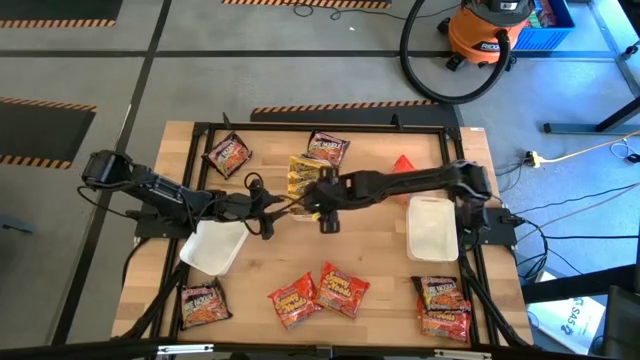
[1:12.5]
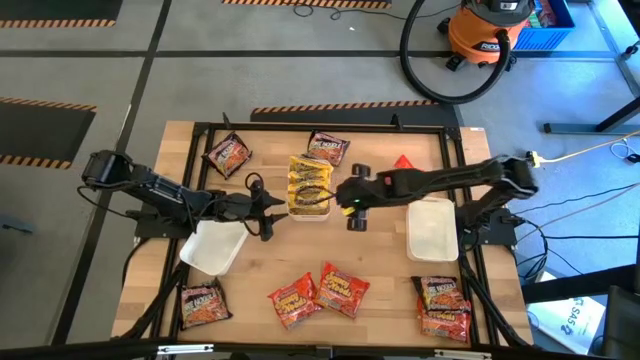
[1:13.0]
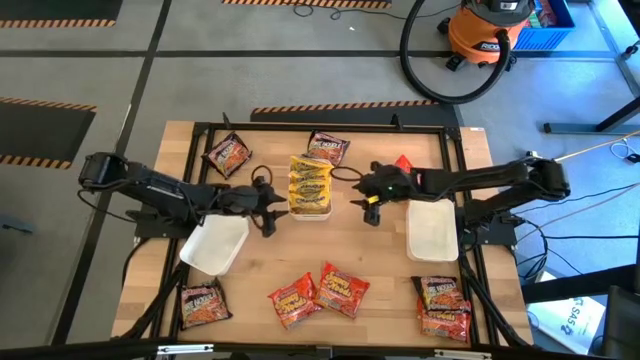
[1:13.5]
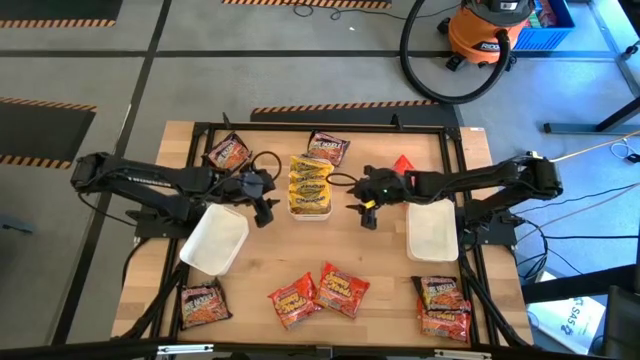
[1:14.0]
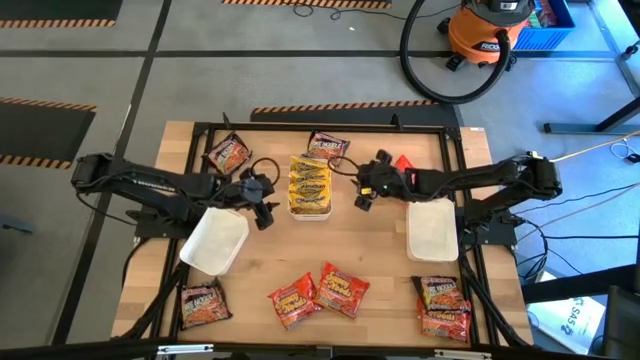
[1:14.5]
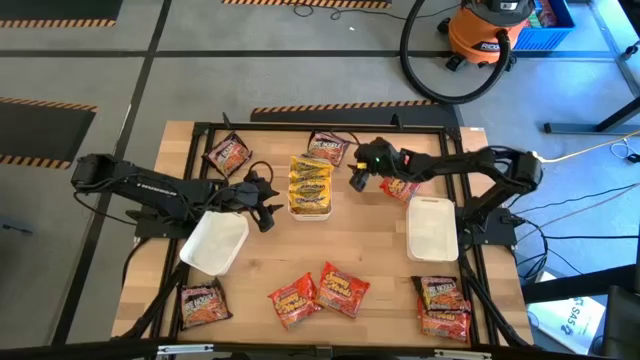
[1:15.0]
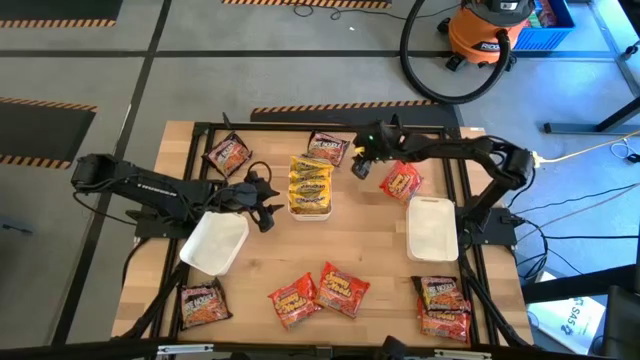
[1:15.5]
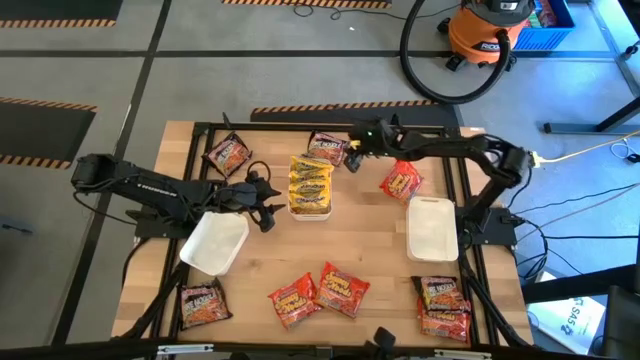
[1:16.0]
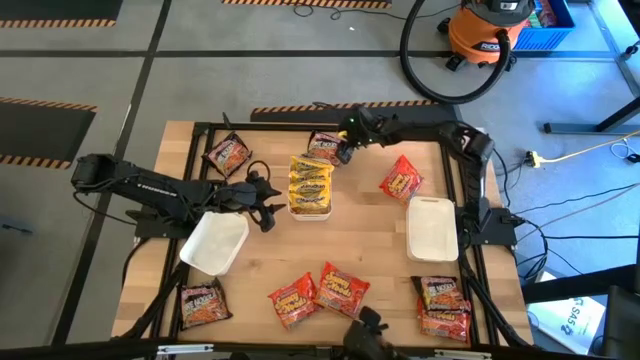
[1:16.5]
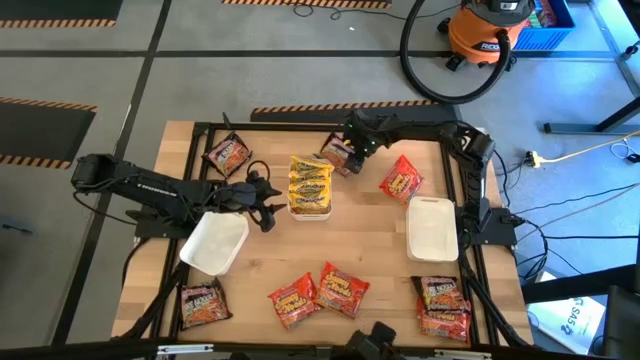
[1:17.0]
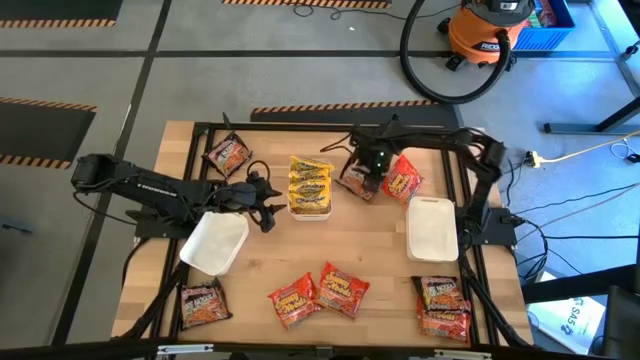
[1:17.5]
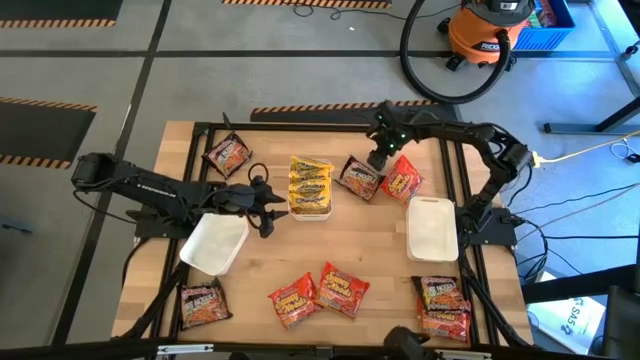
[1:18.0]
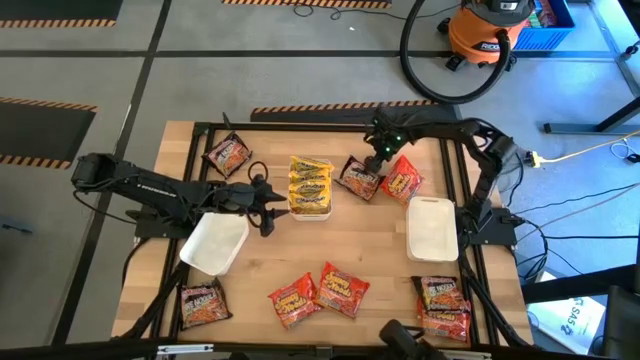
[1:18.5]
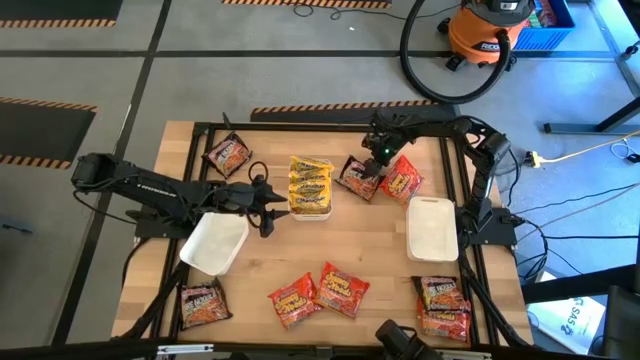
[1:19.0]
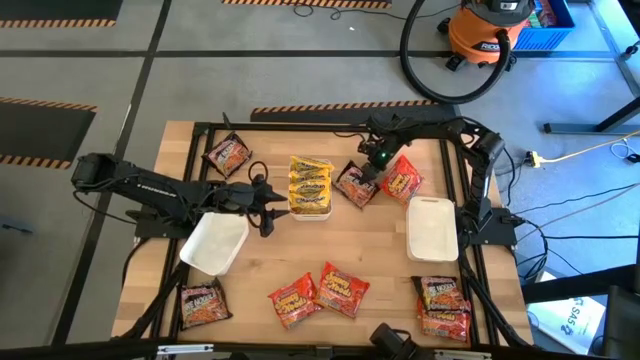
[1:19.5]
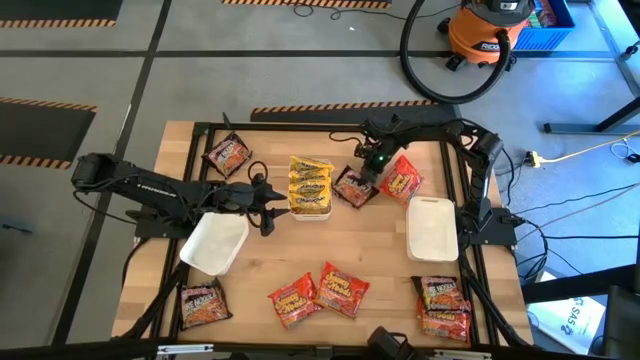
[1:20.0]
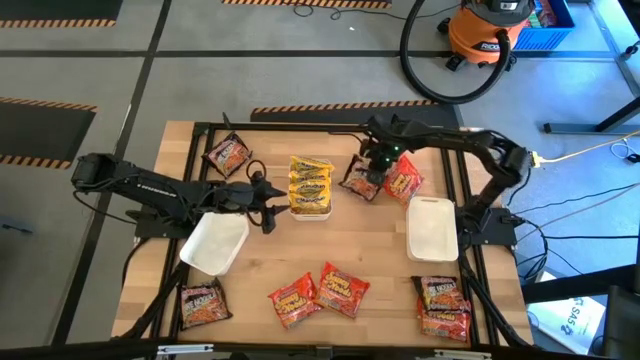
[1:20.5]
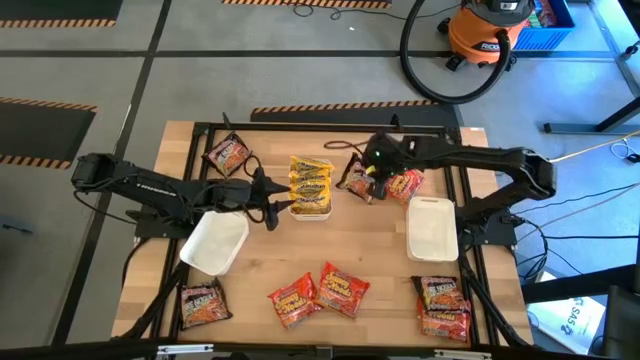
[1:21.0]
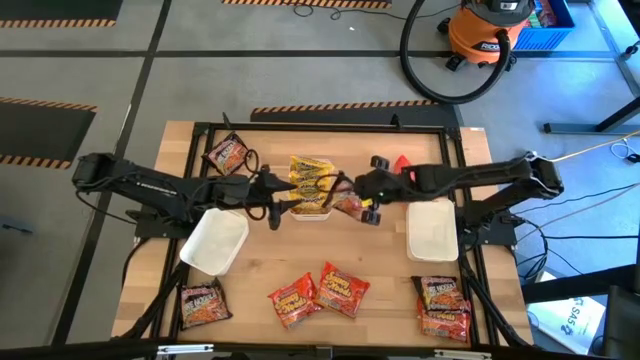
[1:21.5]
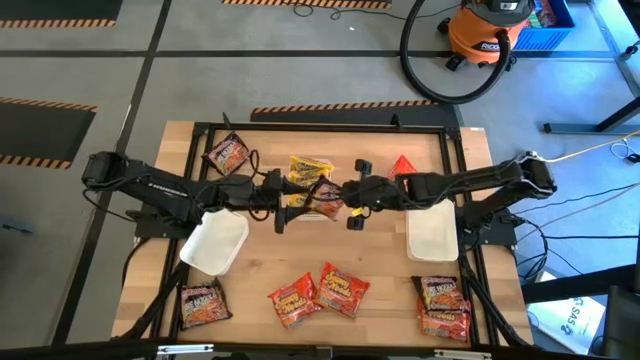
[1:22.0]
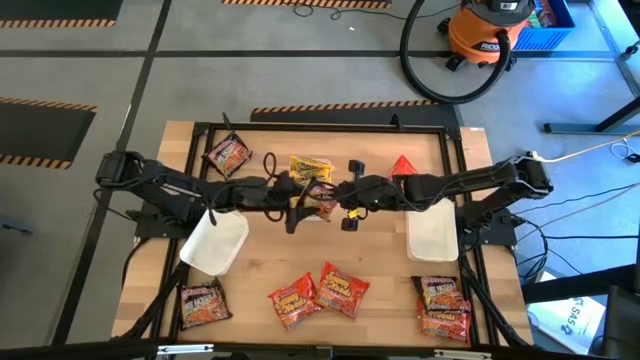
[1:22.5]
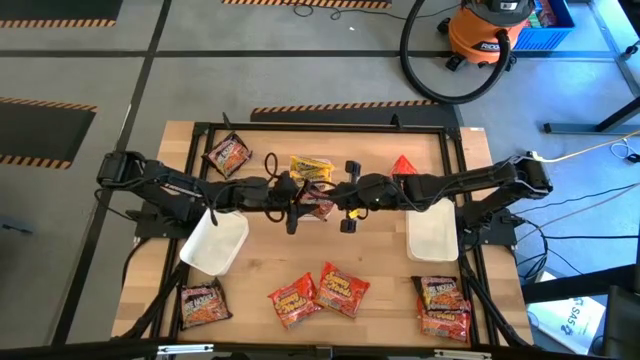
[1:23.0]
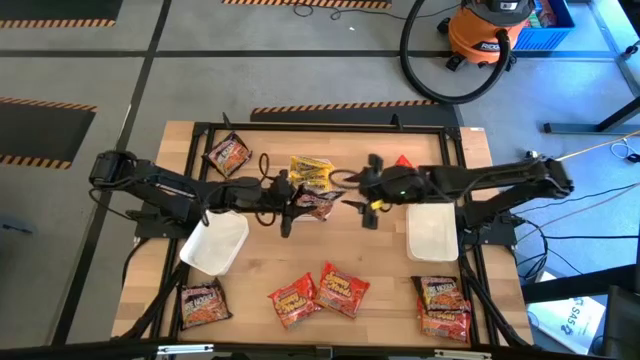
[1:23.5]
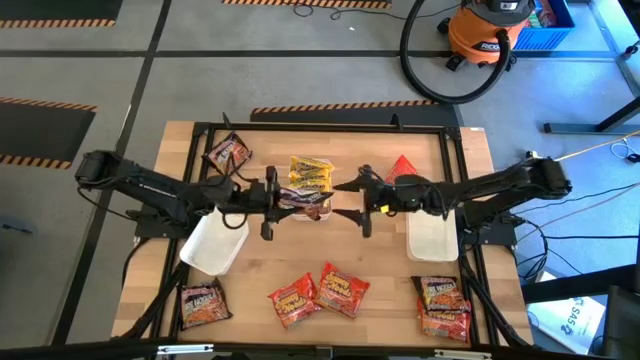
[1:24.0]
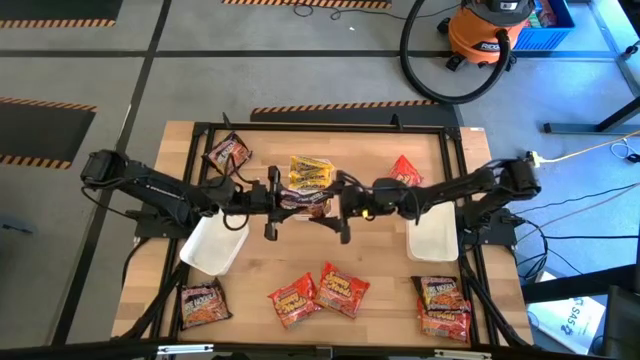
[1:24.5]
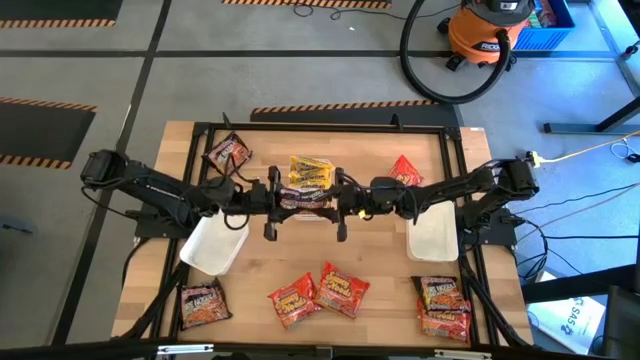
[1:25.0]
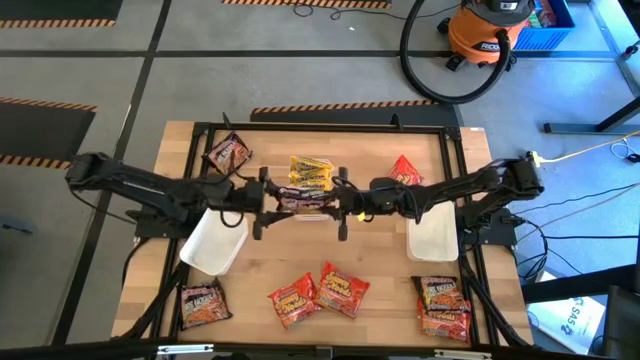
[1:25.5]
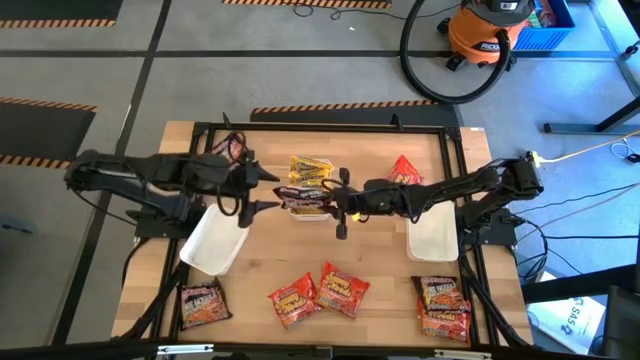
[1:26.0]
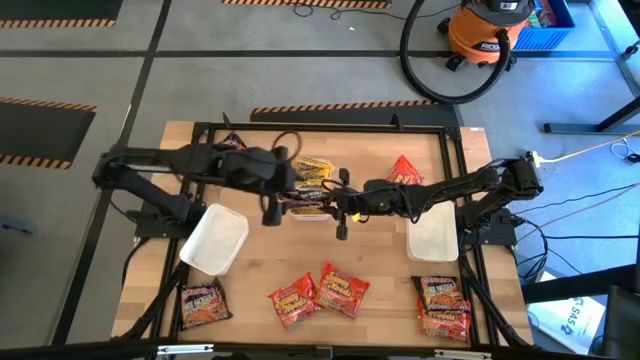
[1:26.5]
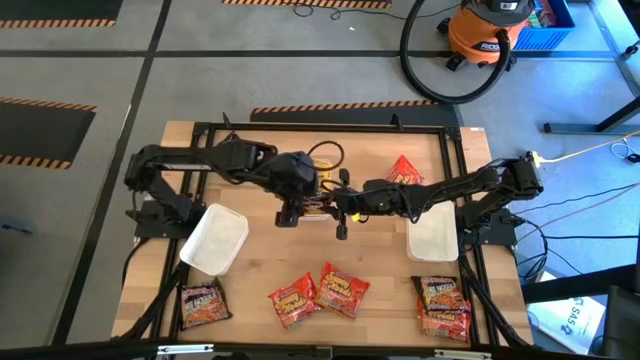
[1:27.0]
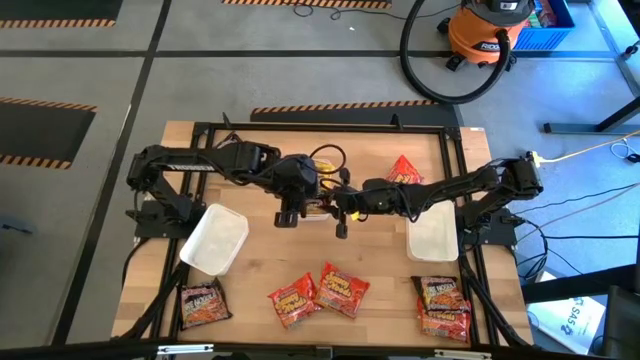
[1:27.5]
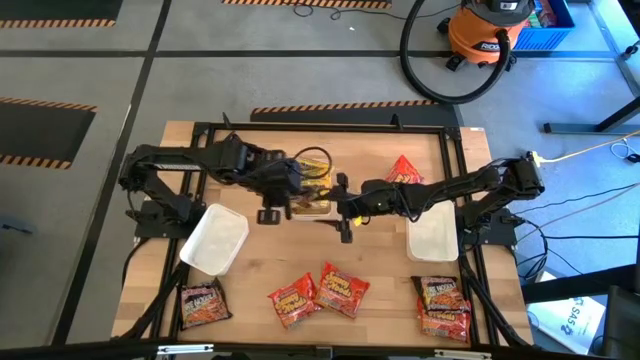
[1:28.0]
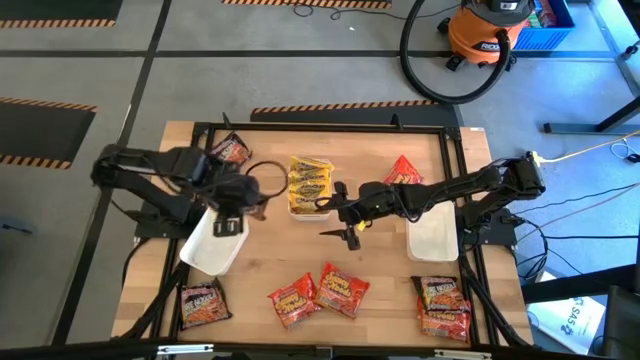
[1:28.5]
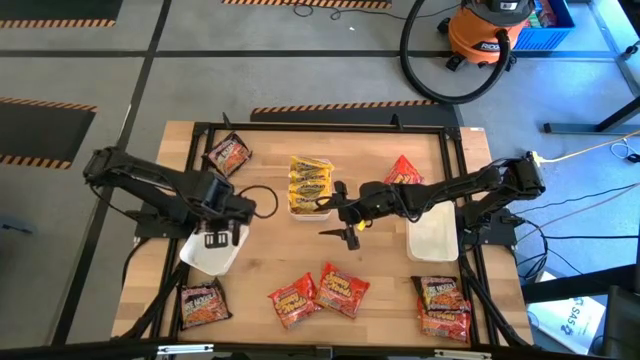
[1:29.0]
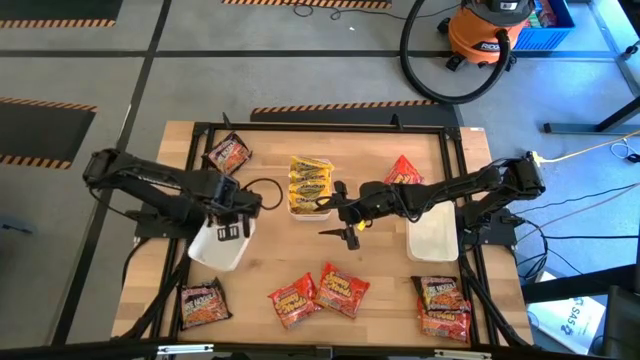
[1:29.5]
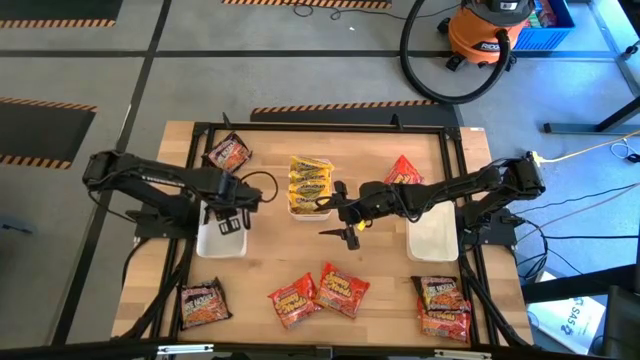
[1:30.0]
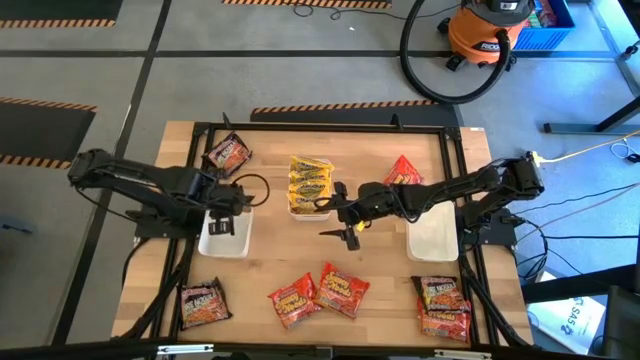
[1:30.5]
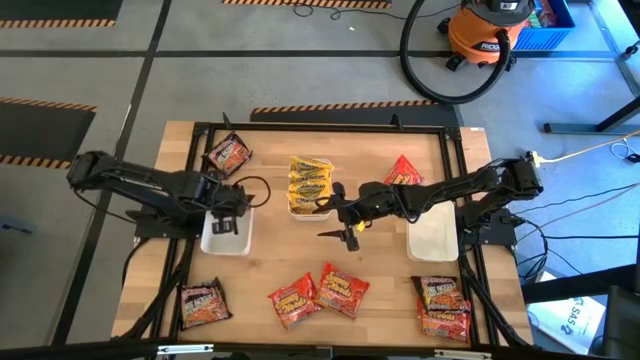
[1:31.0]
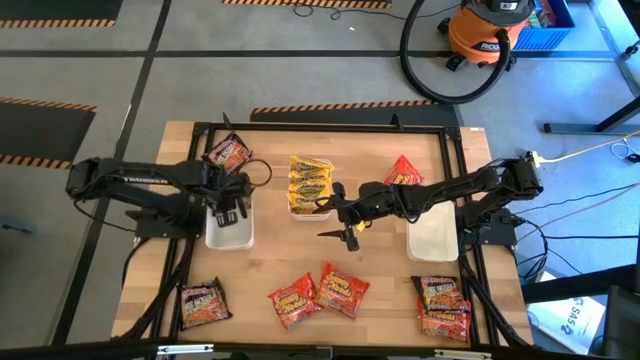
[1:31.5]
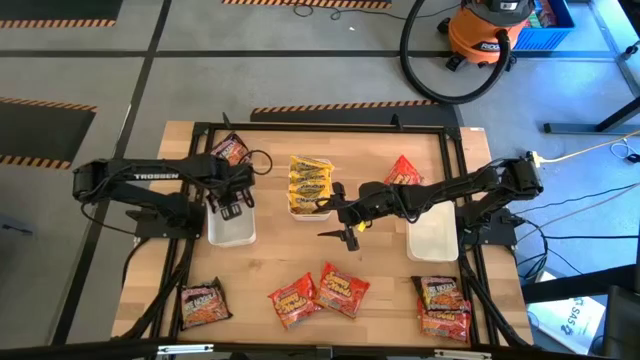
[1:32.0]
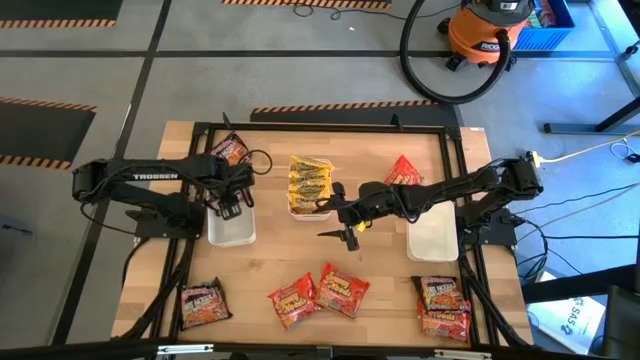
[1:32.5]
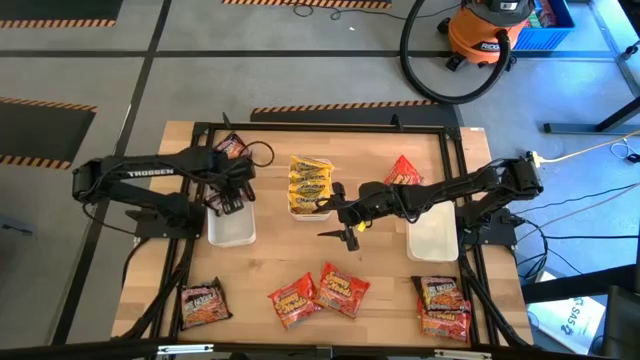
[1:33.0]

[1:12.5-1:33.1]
Task: Sort Maruchan noodles
Put the middle top black noodle pack into the left white bin

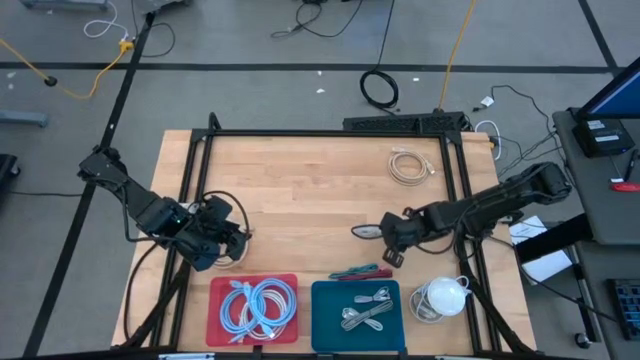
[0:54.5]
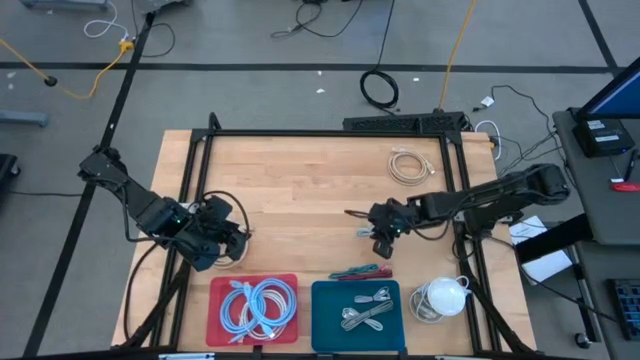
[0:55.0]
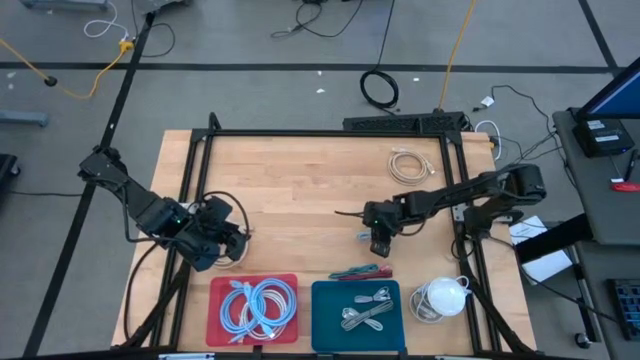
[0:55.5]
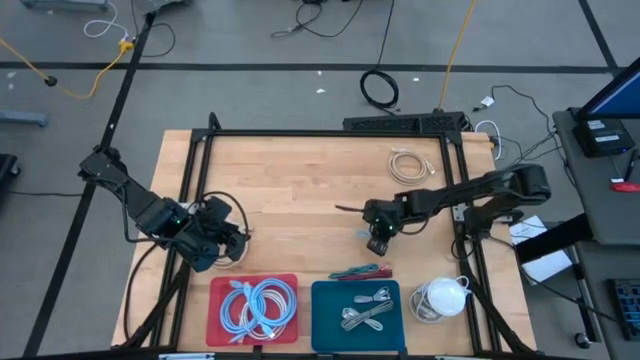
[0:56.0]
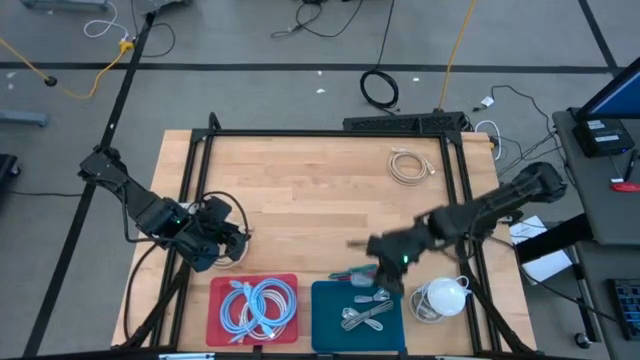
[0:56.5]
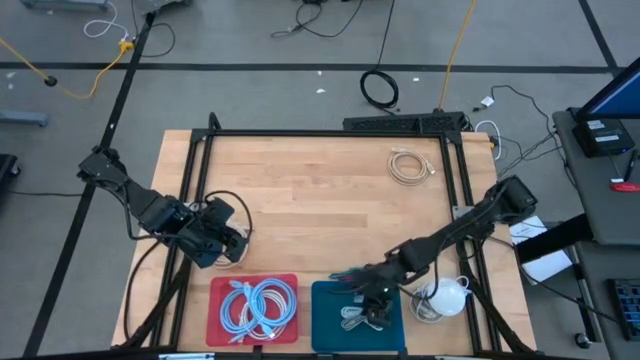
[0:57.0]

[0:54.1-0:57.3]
Task: Pick & Place USB Port
Put the white USB cable into the blue bin
